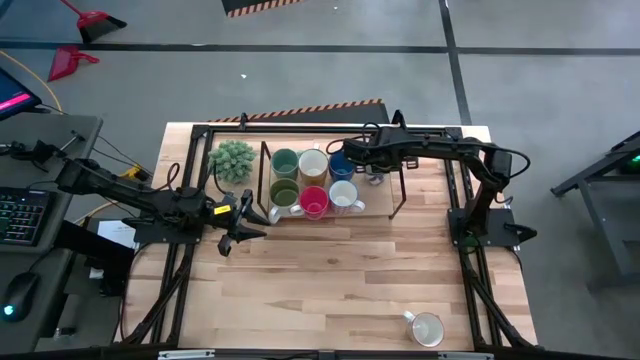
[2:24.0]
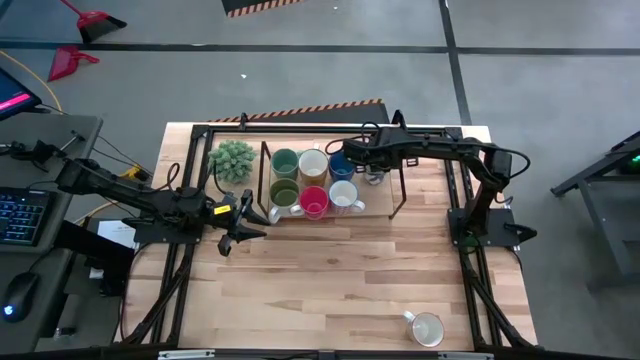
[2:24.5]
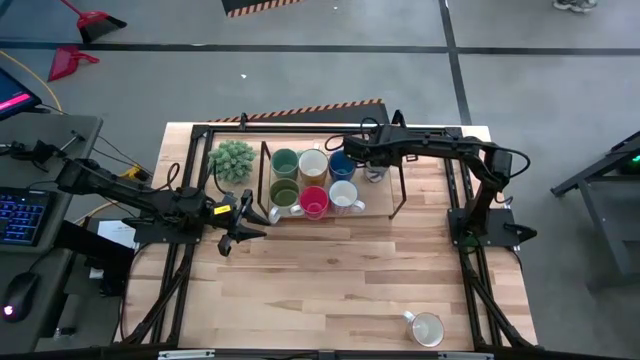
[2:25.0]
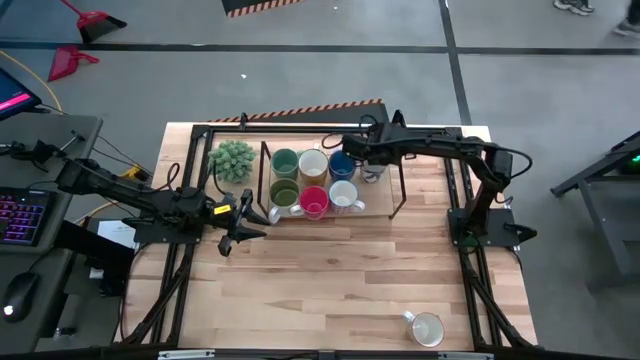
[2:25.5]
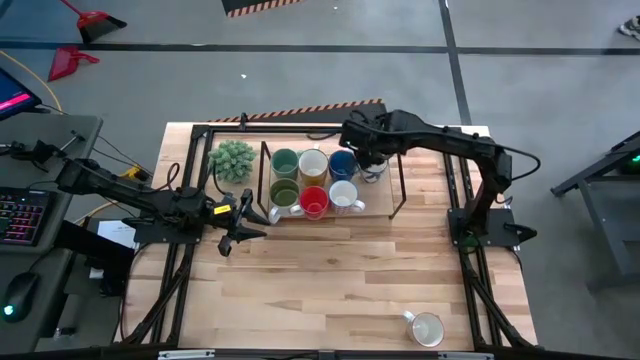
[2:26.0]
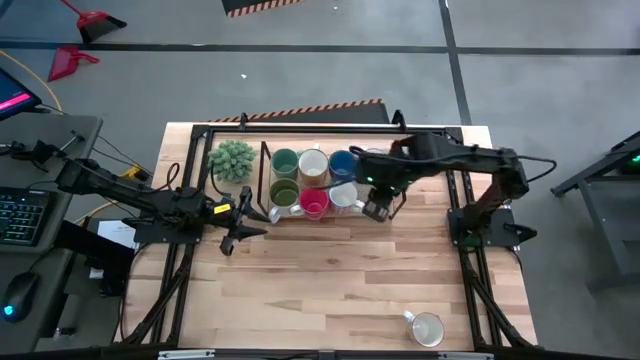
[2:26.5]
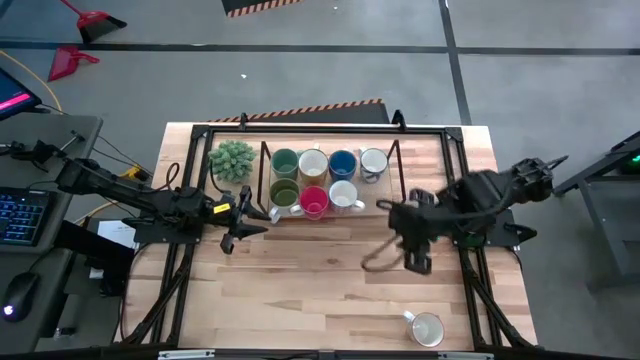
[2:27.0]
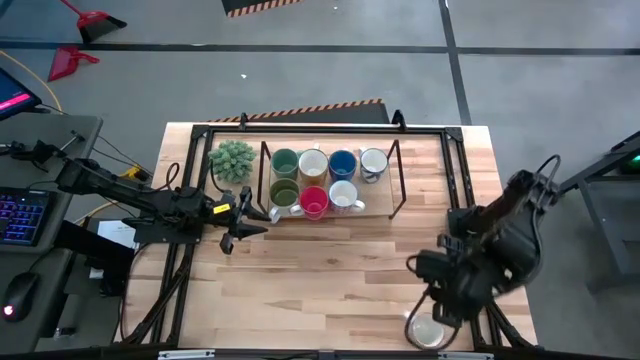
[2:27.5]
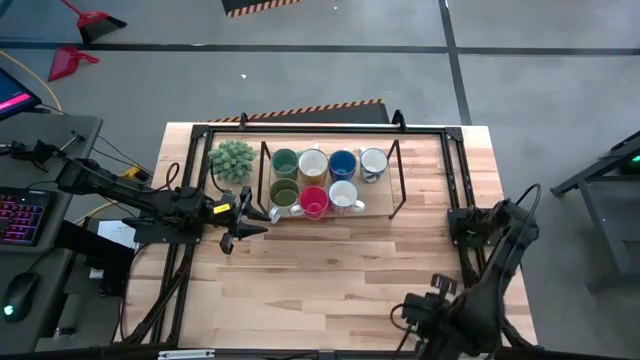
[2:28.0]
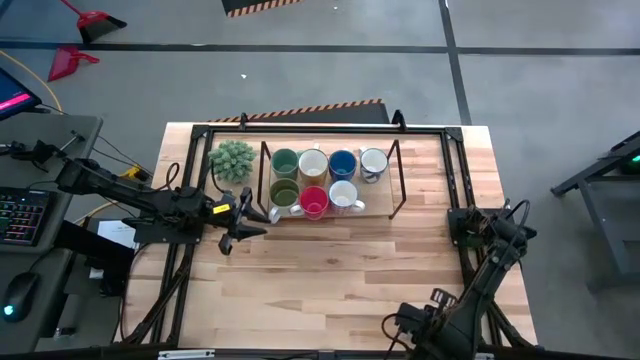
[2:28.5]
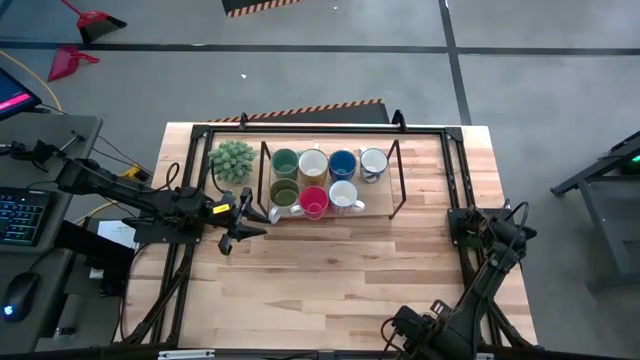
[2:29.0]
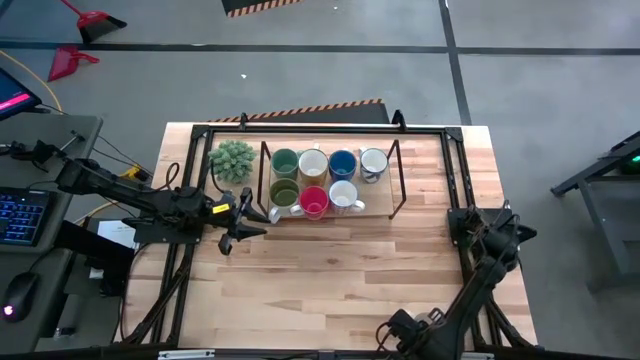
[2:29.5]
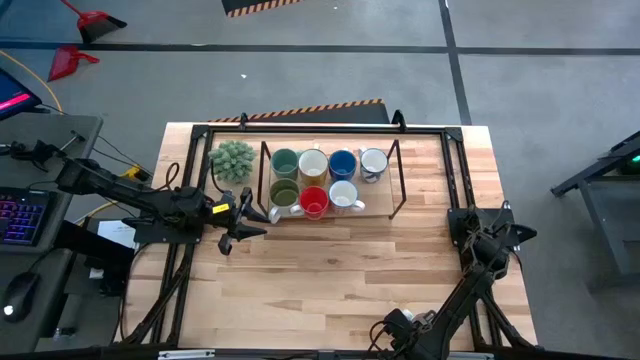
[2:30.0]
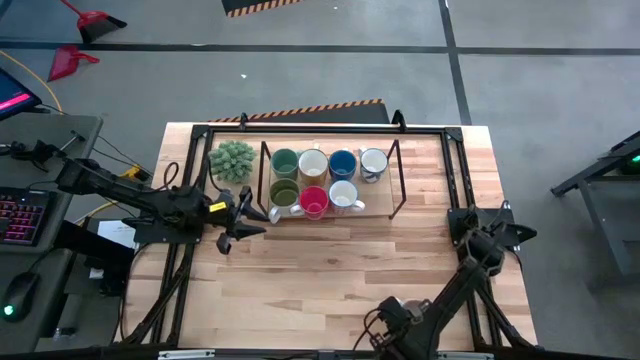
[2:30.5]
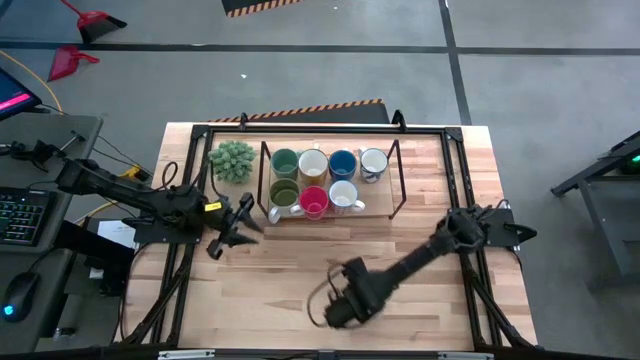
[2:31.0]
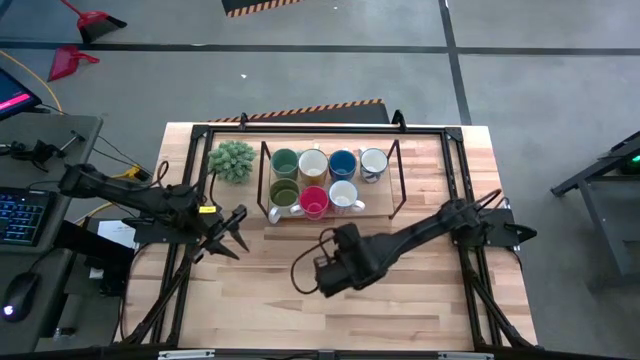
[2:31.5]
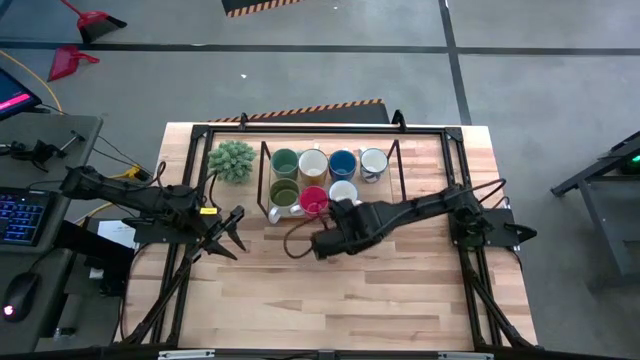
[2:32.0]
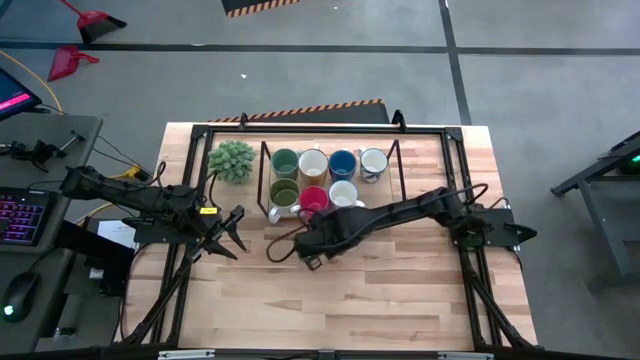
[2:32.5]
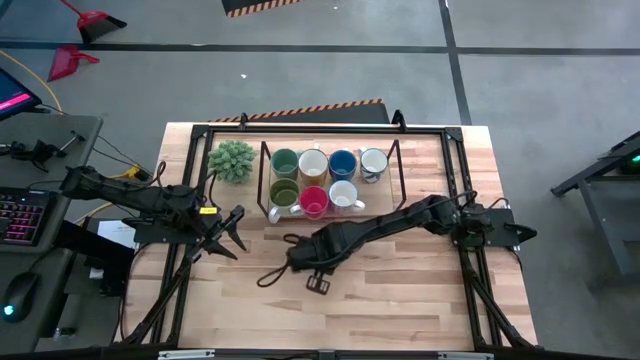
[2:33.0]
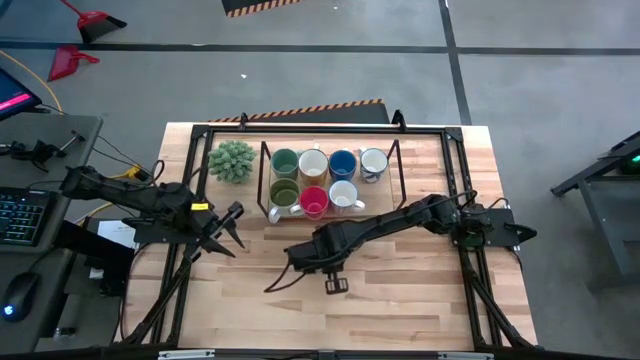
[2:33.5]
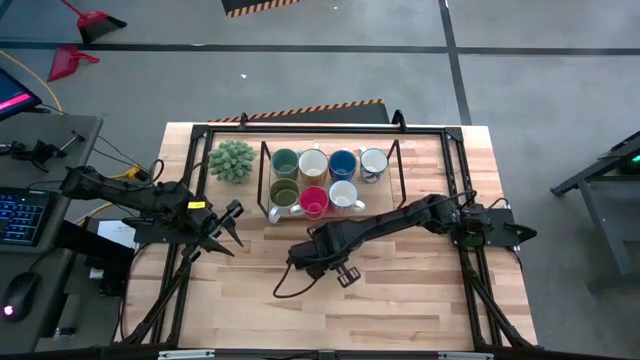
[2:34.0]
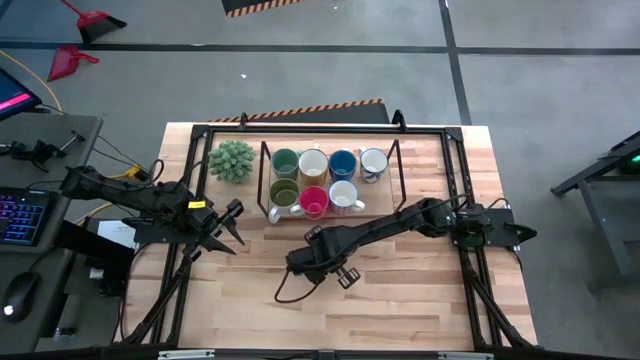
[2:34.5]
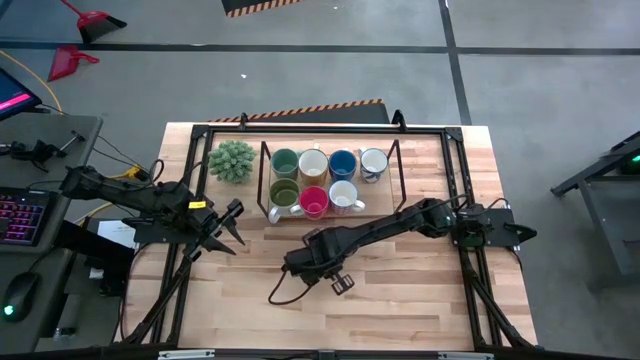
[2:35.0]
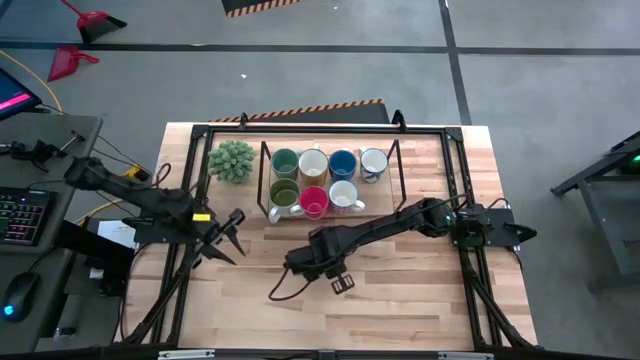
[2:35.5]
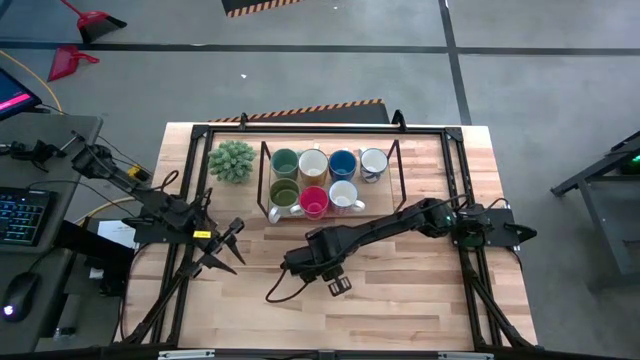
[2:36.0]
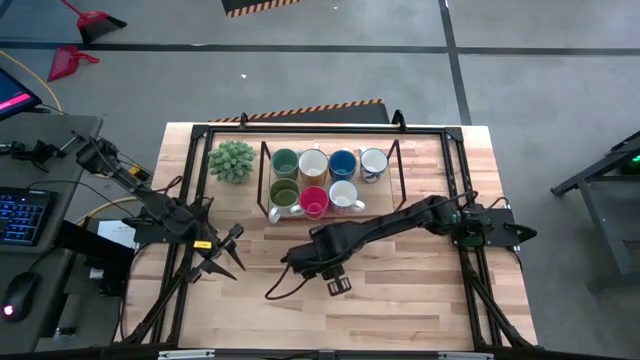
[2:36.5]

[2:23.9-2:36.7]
Task: Place coffee mugs
Put the gray patterned mug on the shelf
